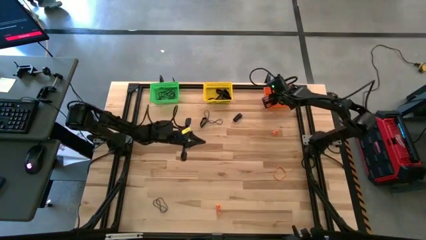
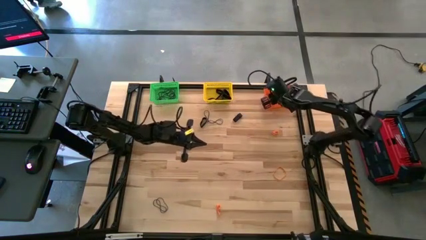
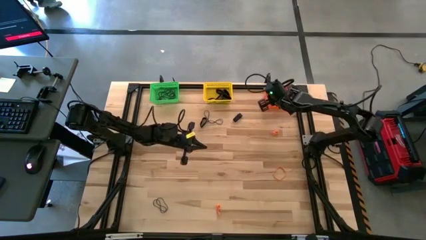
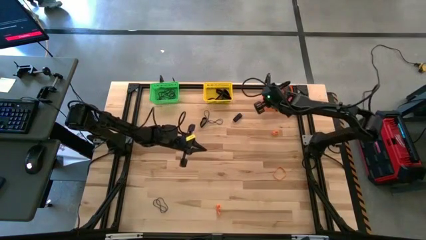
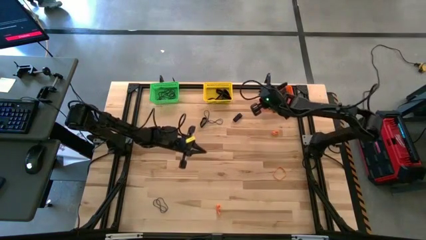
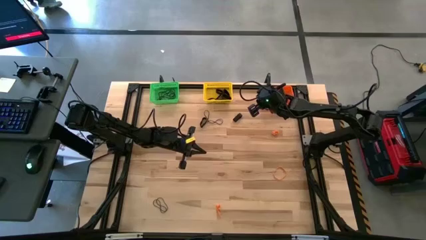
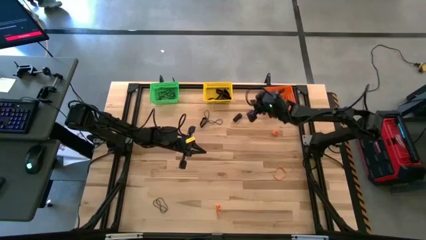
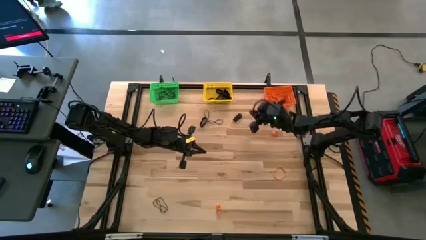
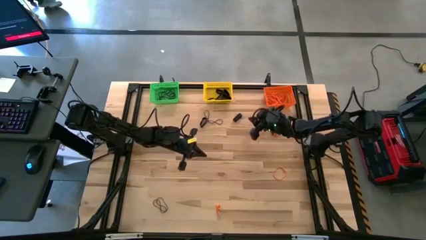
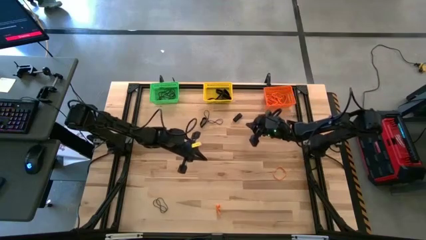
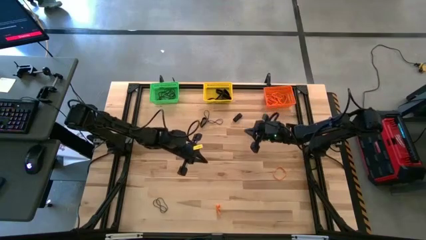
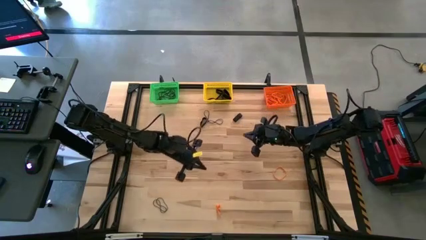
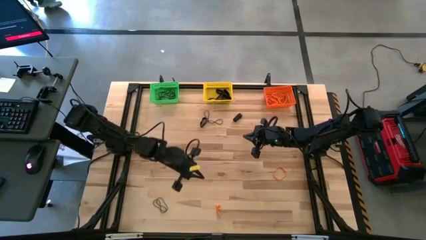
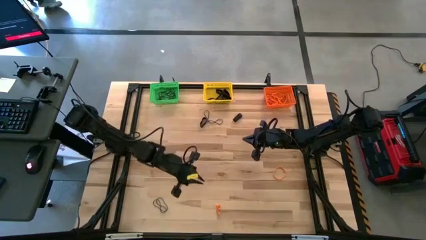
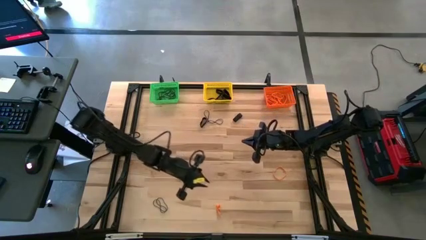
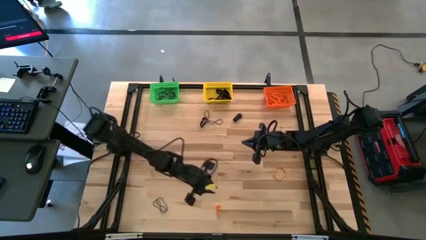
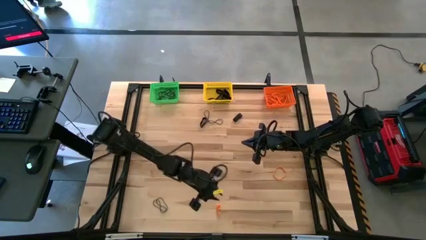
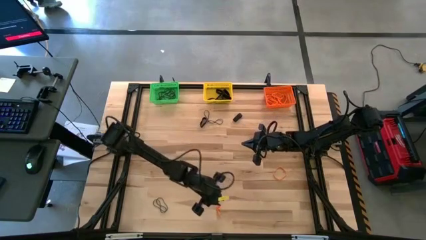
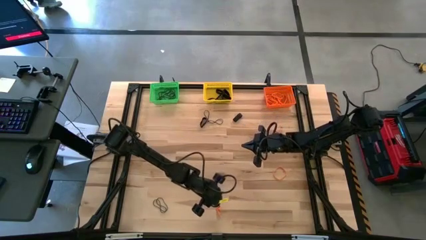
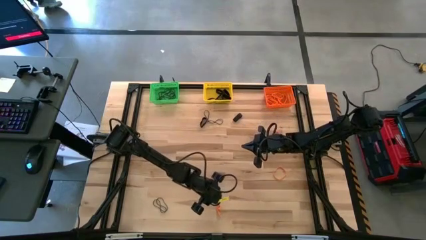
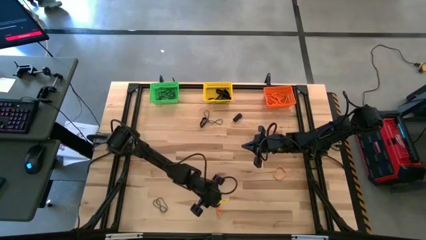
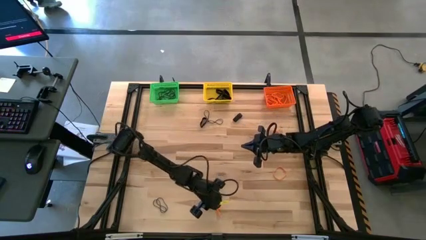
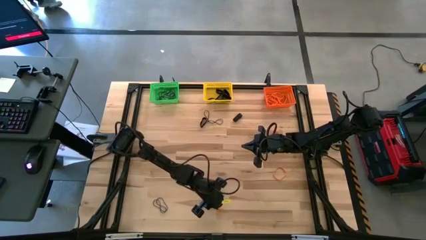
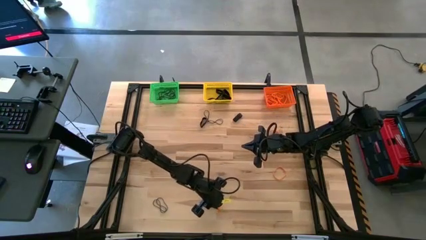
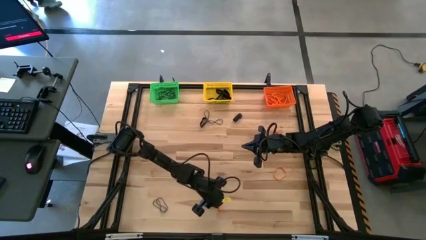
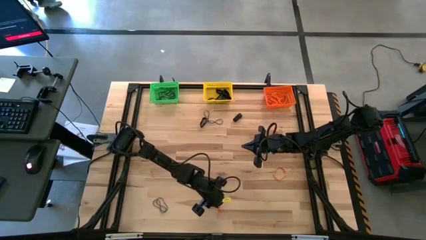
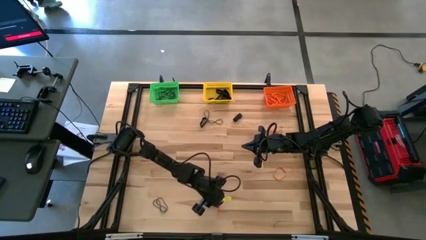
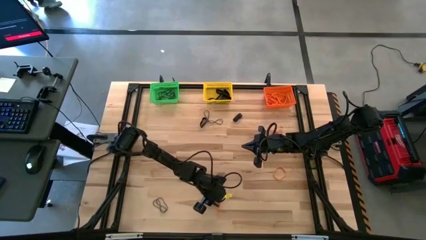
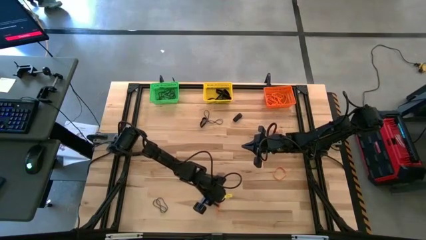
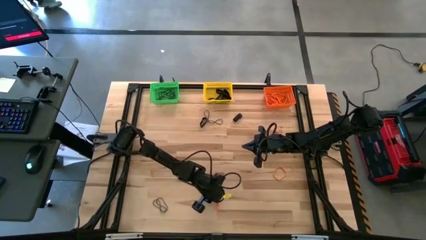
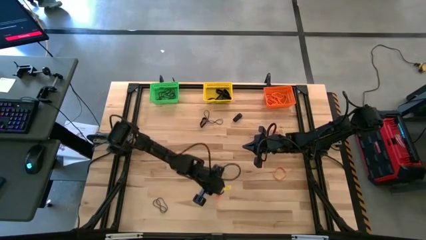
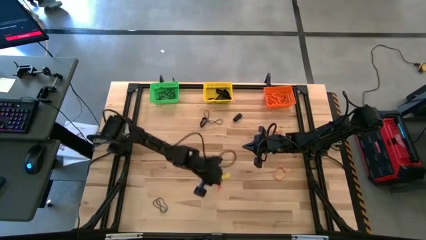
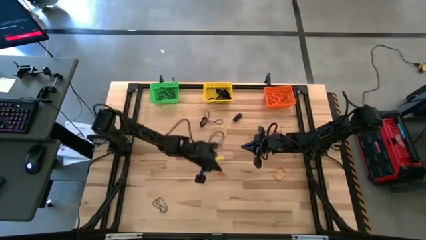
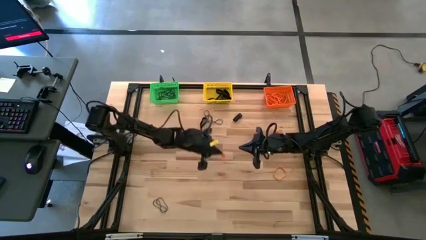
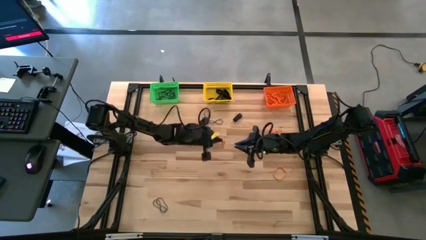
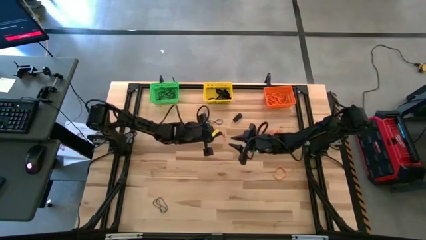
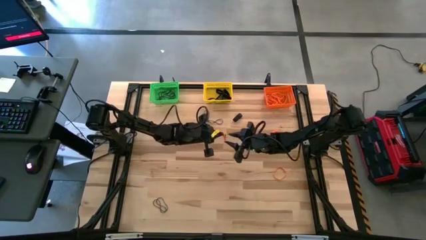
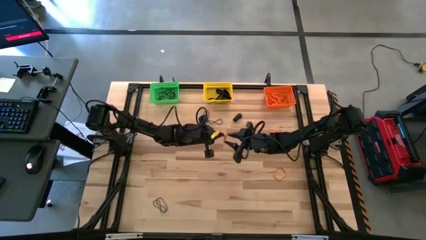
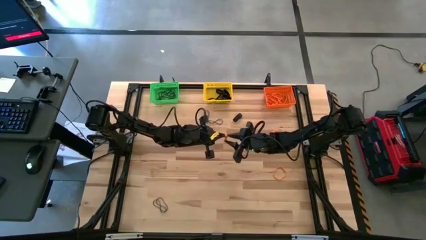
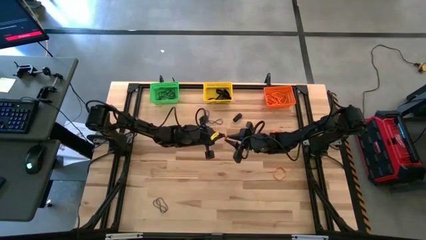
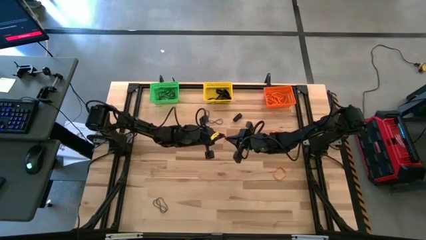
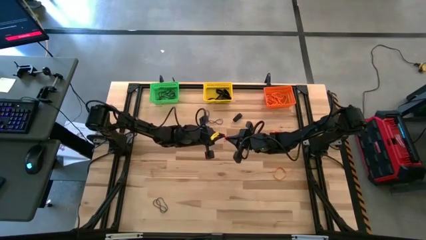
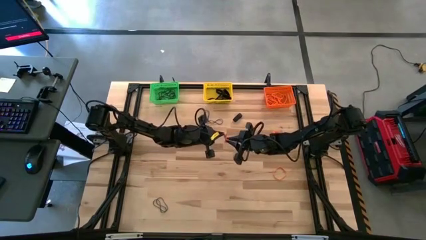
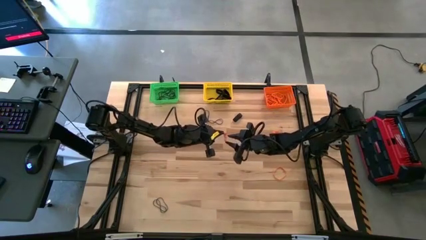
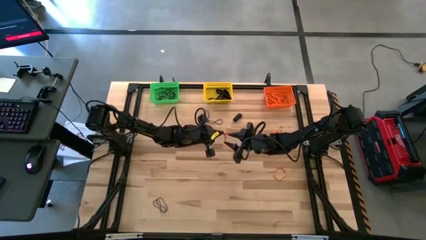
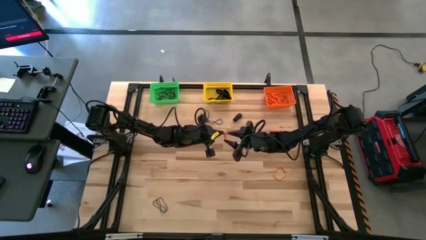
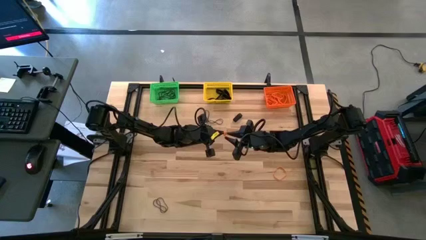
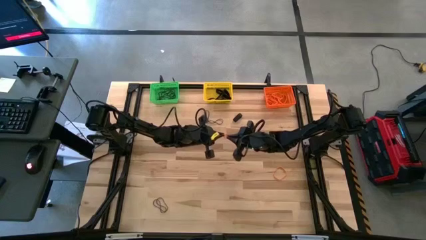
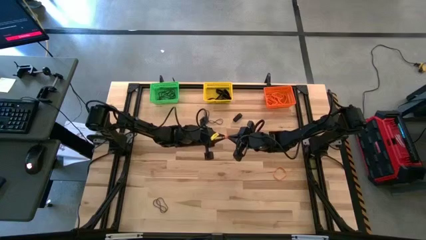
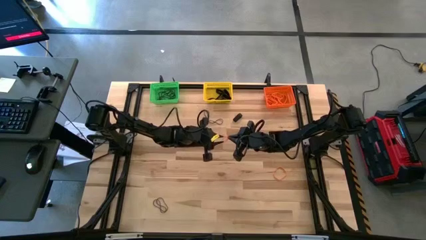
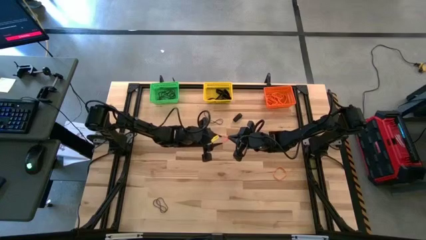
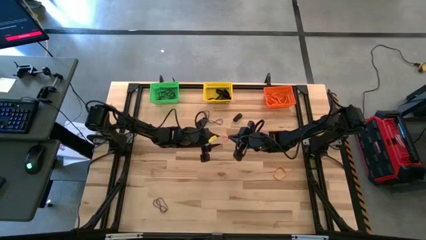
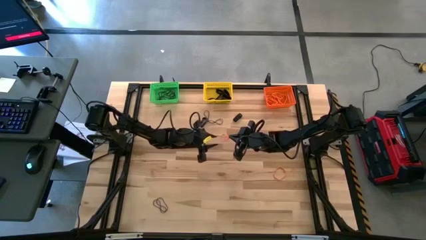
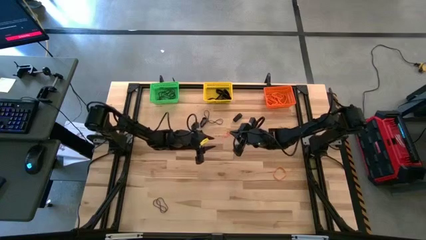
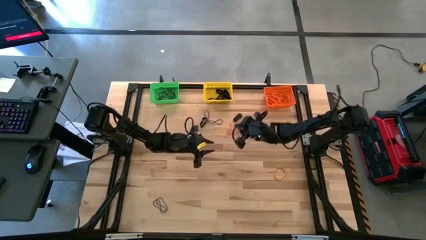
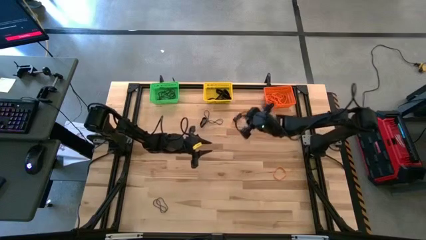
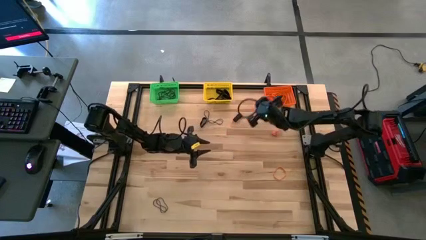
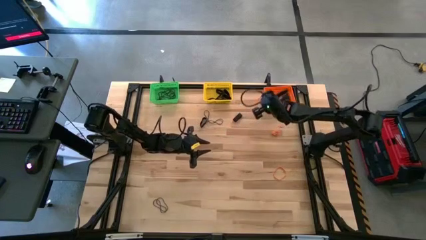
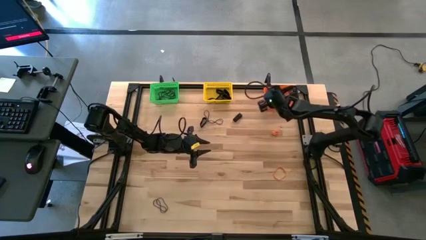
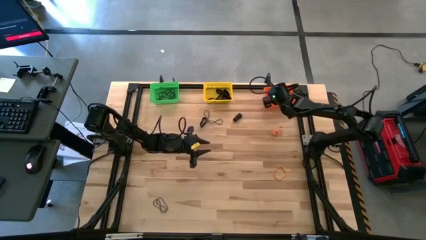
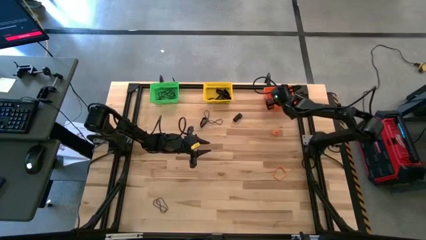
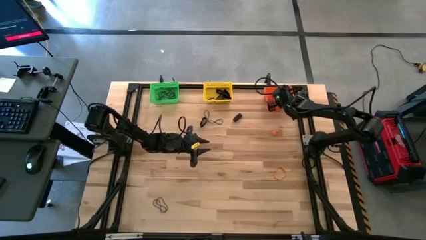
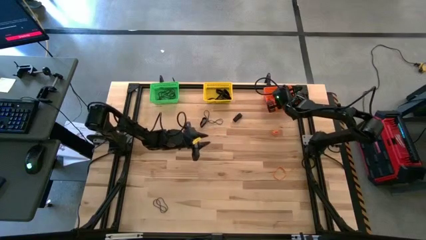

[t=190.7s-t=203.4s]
Task: Sort rubber bands into baskets
Put the orange rubber band into the orange bin

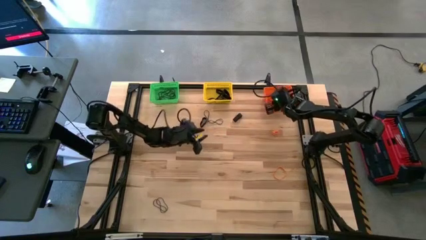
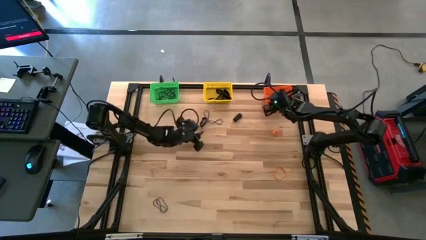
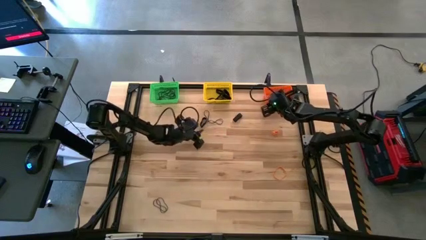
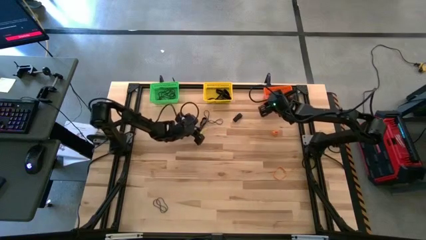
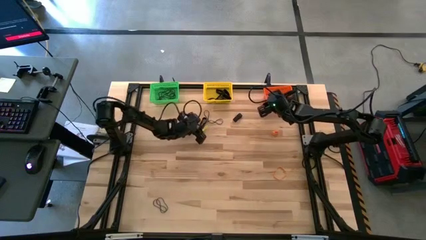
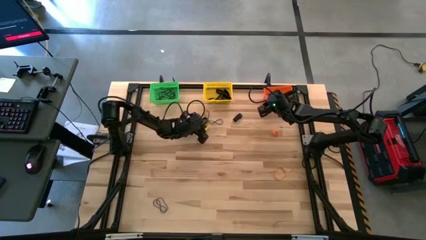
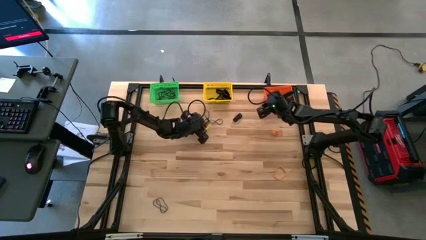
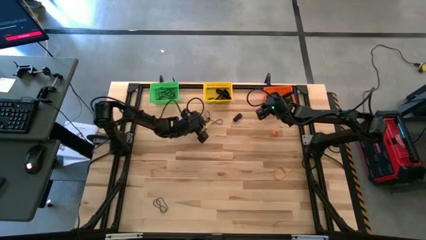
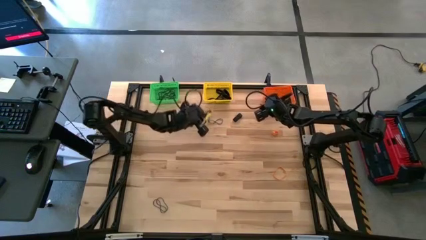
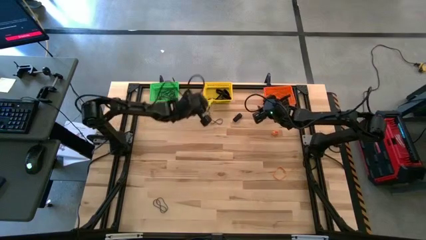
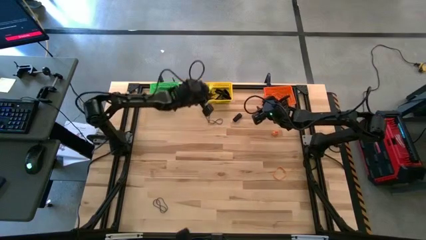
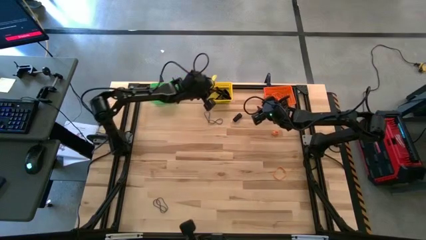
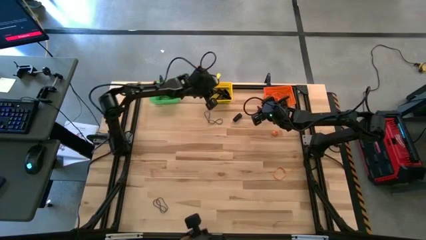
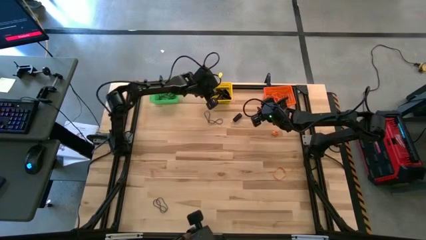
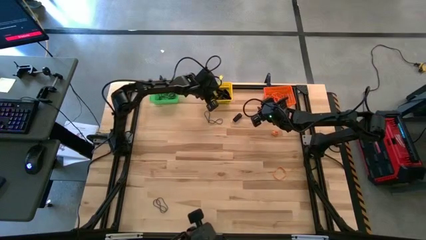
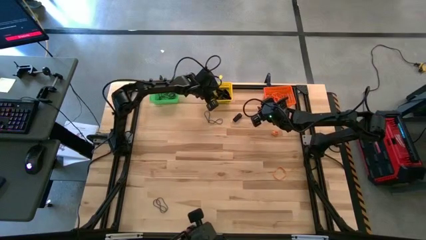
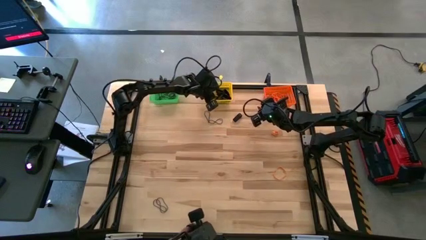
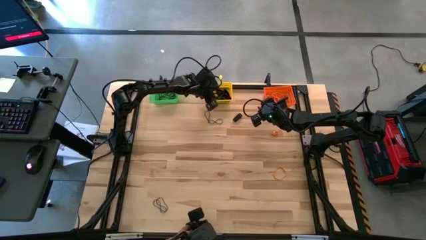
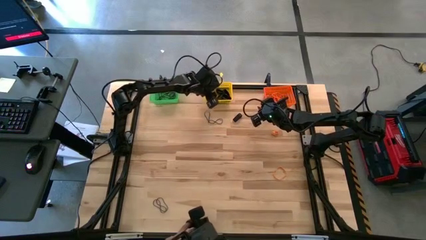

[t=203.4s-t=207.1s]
Put the black rubber band into the yellow bin
